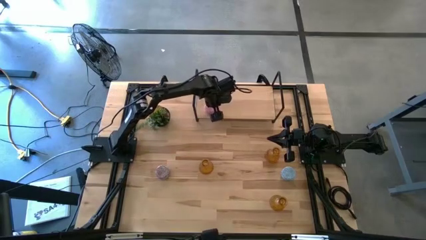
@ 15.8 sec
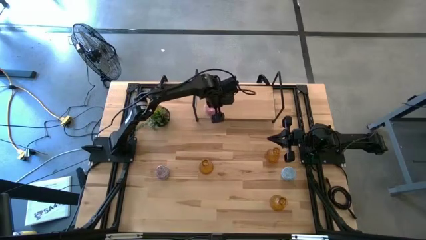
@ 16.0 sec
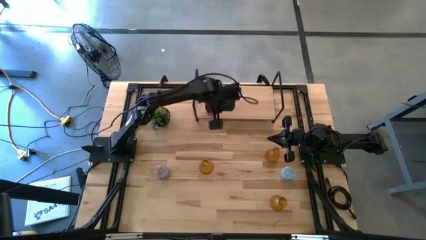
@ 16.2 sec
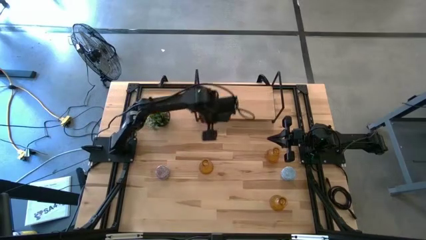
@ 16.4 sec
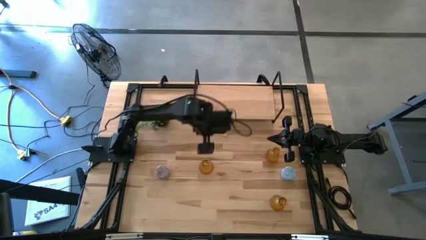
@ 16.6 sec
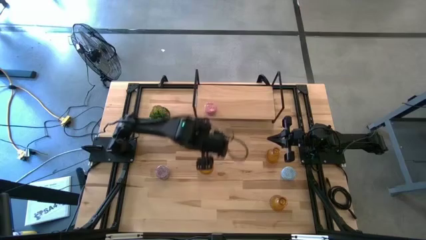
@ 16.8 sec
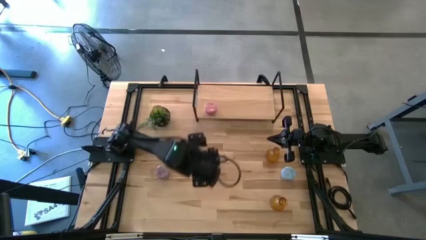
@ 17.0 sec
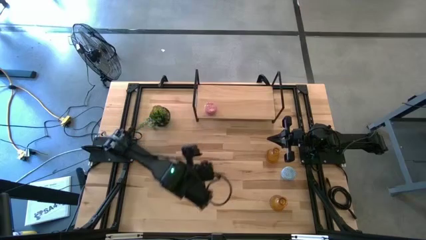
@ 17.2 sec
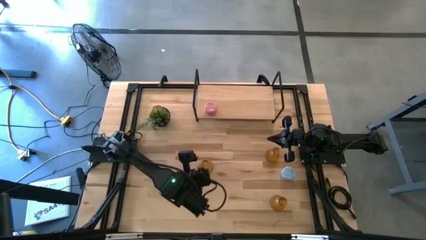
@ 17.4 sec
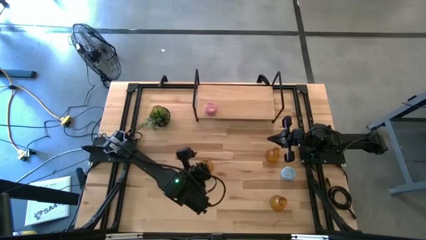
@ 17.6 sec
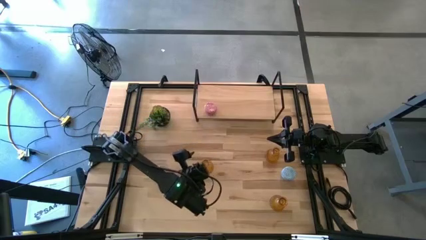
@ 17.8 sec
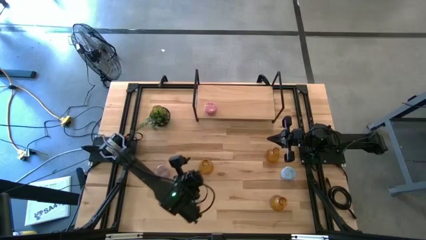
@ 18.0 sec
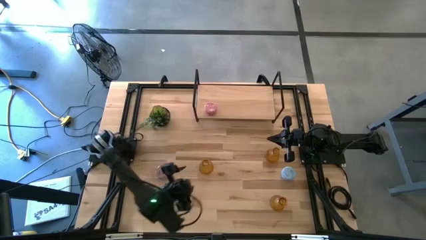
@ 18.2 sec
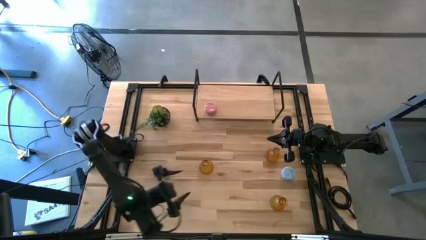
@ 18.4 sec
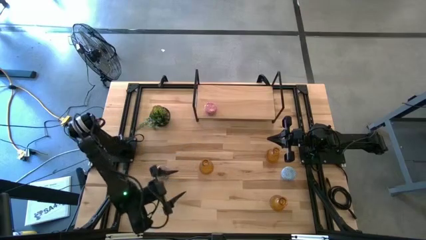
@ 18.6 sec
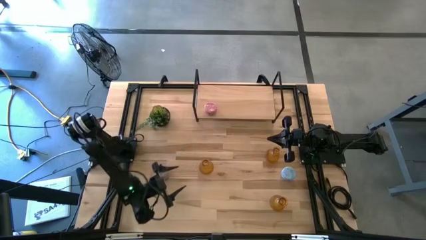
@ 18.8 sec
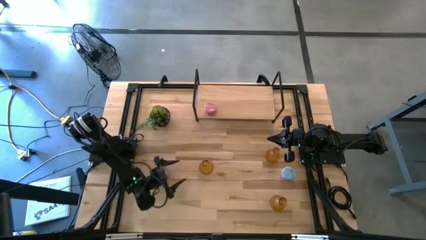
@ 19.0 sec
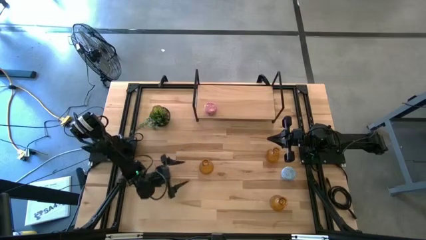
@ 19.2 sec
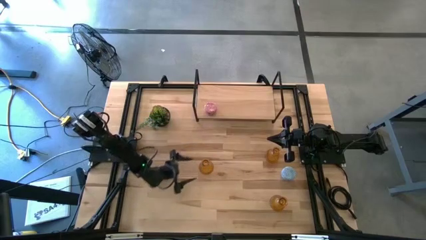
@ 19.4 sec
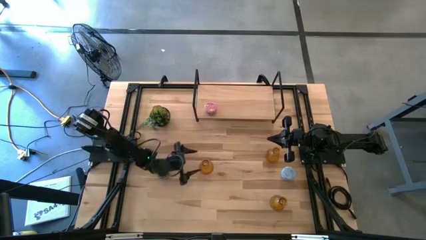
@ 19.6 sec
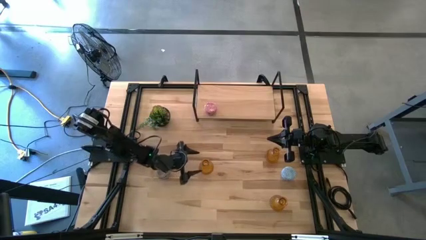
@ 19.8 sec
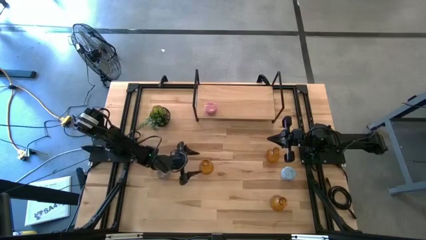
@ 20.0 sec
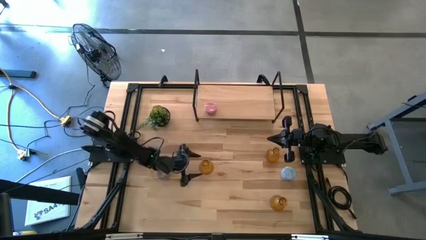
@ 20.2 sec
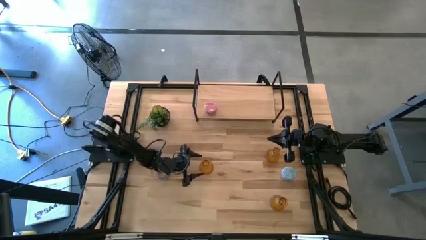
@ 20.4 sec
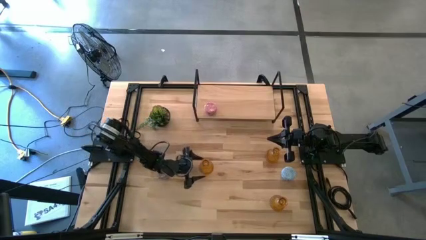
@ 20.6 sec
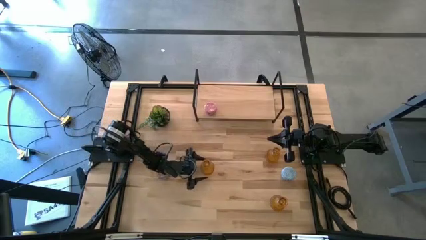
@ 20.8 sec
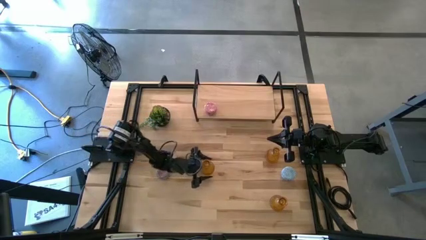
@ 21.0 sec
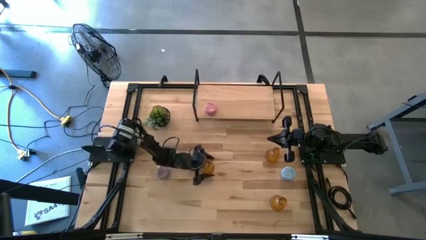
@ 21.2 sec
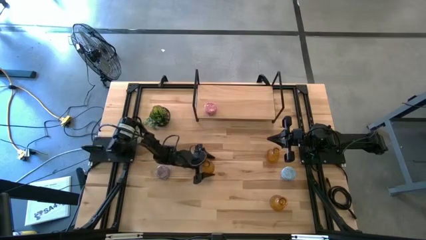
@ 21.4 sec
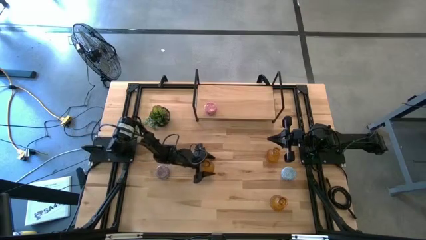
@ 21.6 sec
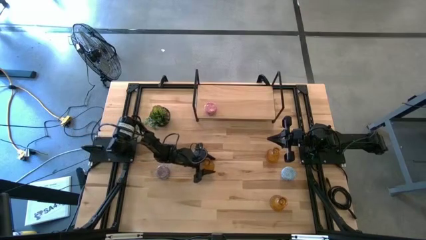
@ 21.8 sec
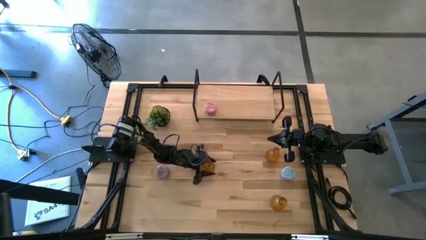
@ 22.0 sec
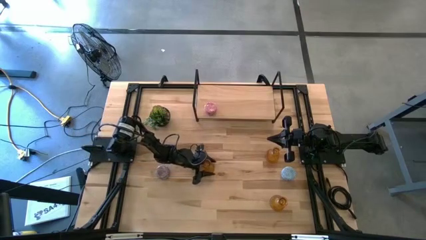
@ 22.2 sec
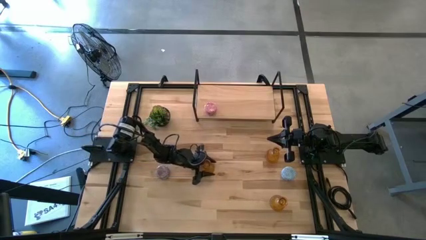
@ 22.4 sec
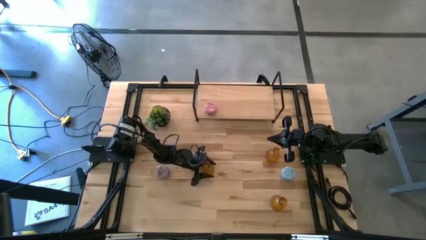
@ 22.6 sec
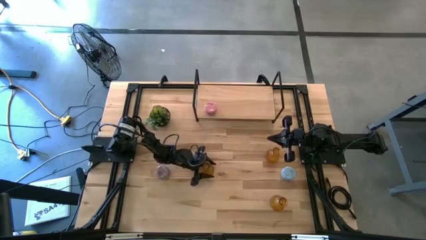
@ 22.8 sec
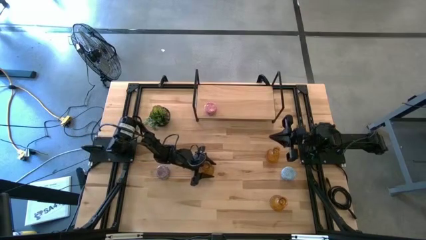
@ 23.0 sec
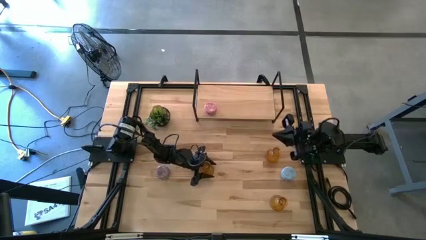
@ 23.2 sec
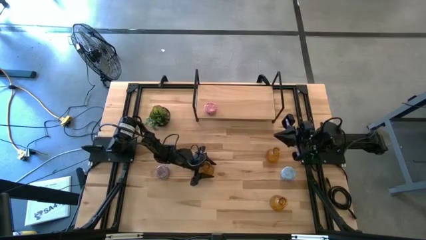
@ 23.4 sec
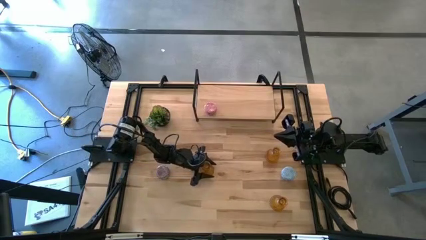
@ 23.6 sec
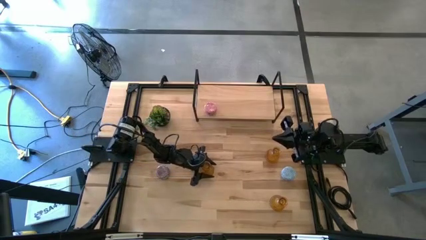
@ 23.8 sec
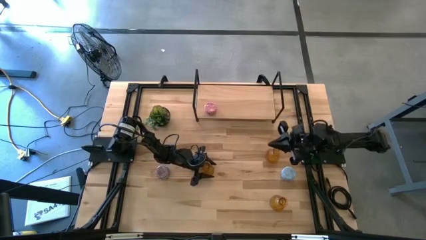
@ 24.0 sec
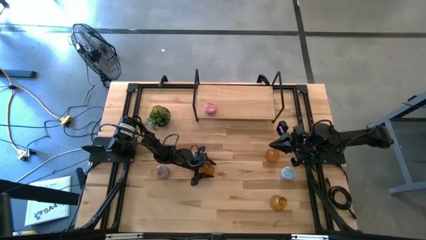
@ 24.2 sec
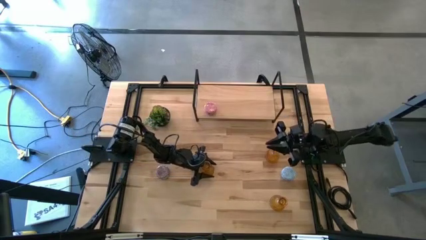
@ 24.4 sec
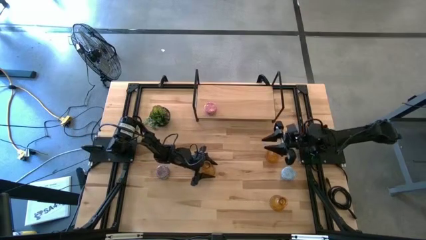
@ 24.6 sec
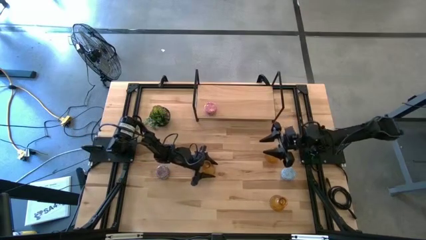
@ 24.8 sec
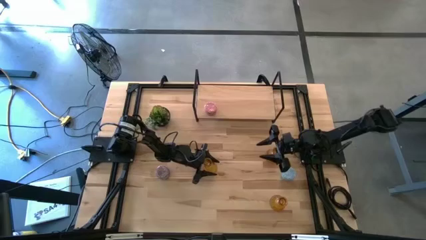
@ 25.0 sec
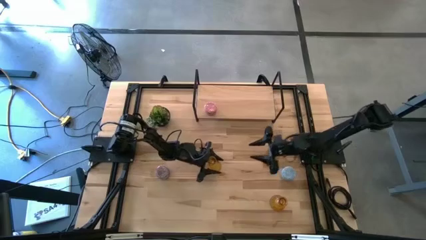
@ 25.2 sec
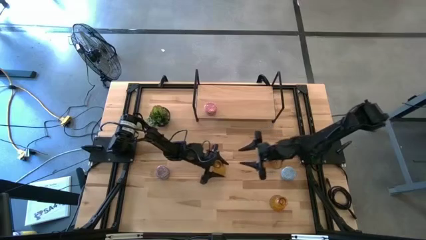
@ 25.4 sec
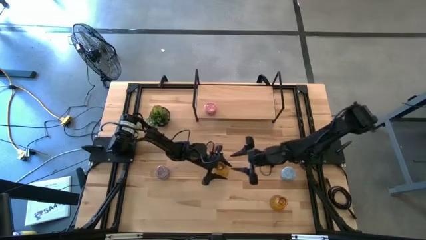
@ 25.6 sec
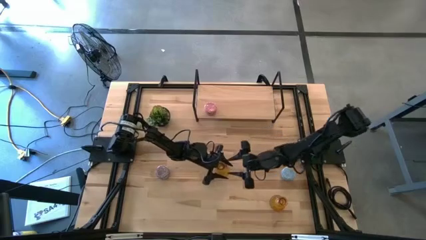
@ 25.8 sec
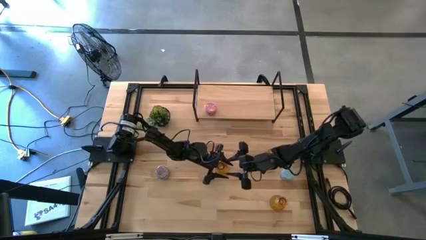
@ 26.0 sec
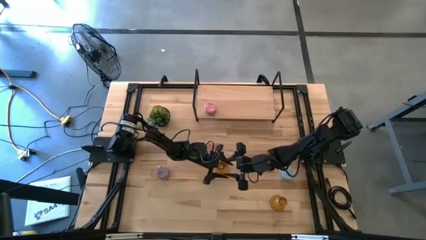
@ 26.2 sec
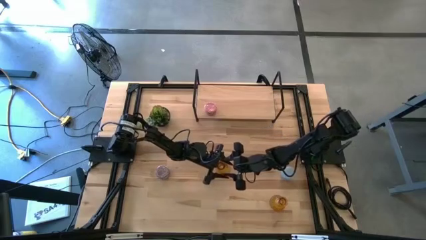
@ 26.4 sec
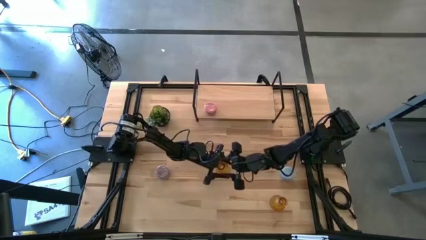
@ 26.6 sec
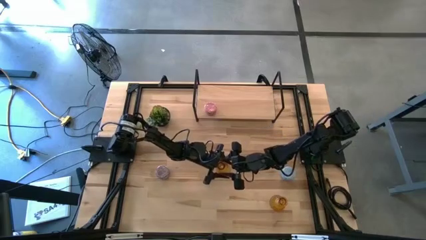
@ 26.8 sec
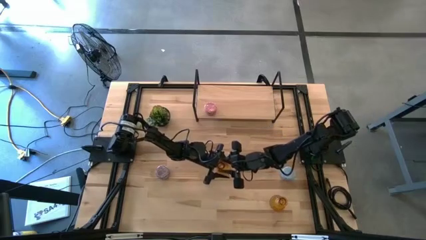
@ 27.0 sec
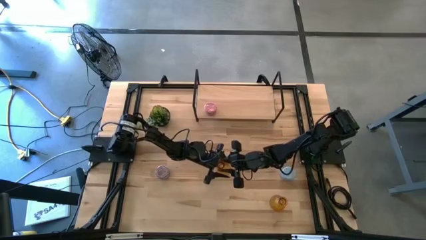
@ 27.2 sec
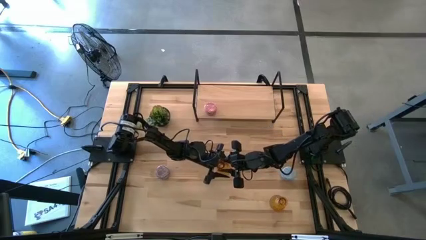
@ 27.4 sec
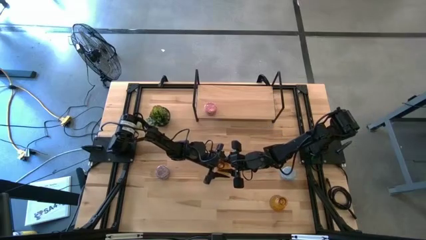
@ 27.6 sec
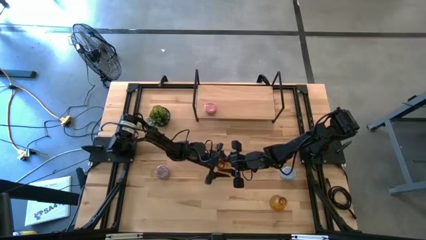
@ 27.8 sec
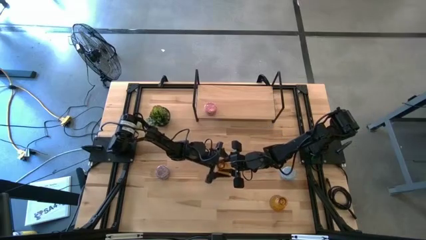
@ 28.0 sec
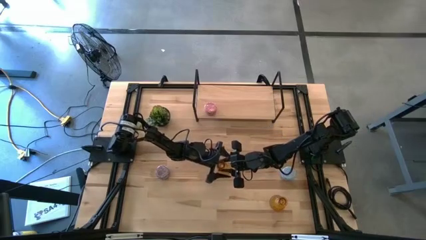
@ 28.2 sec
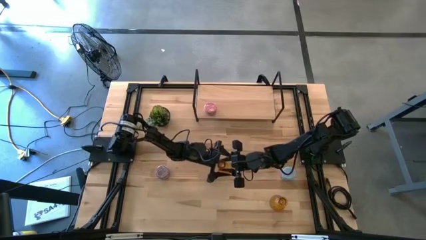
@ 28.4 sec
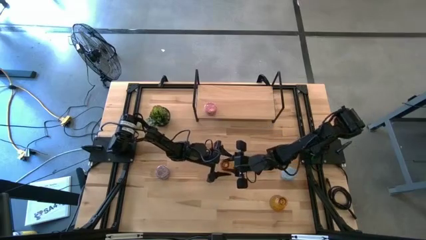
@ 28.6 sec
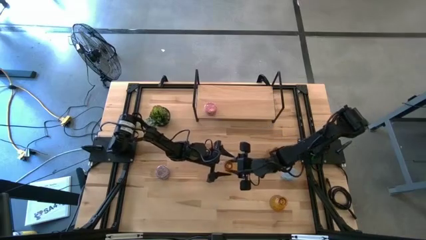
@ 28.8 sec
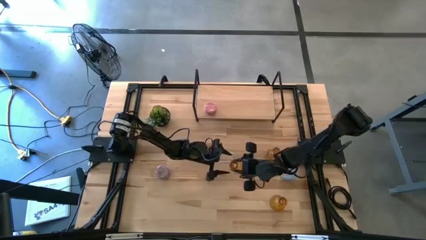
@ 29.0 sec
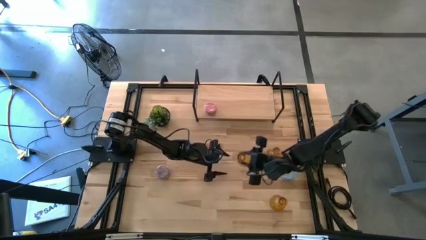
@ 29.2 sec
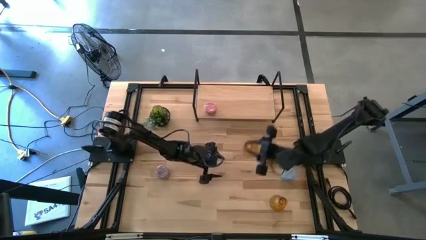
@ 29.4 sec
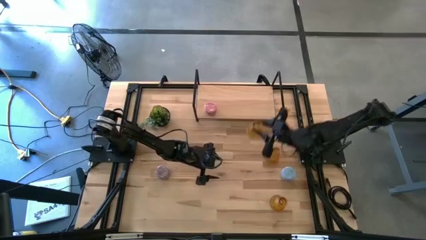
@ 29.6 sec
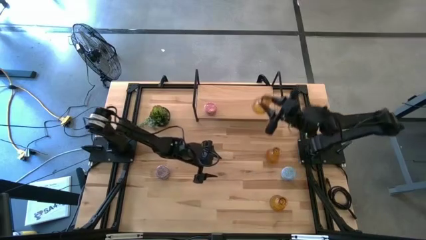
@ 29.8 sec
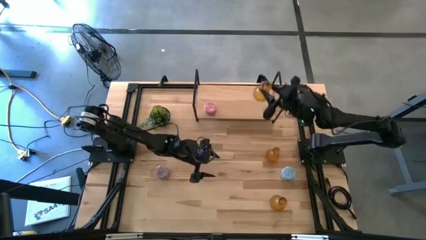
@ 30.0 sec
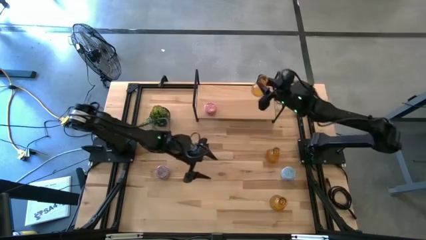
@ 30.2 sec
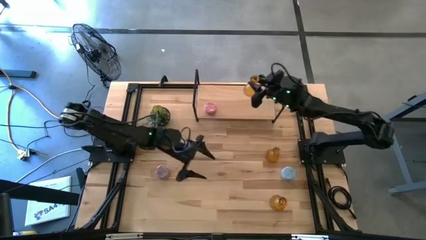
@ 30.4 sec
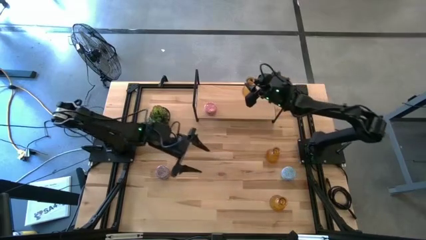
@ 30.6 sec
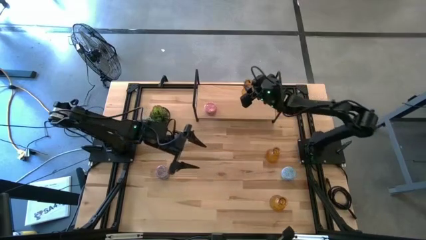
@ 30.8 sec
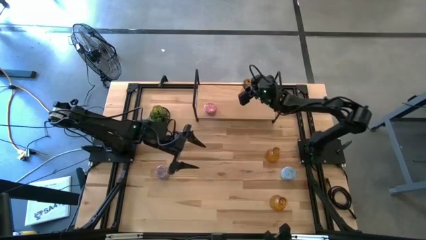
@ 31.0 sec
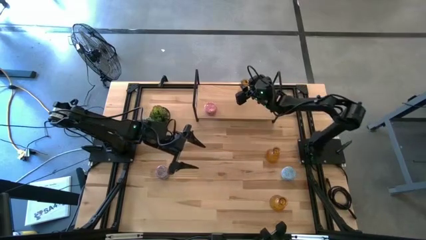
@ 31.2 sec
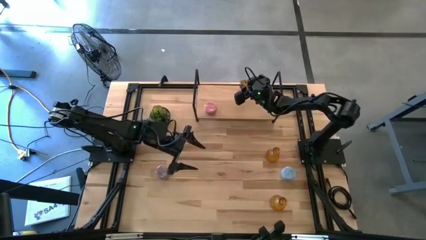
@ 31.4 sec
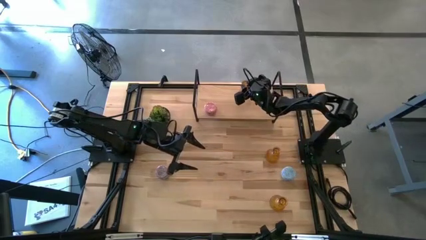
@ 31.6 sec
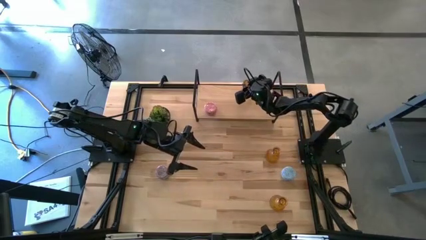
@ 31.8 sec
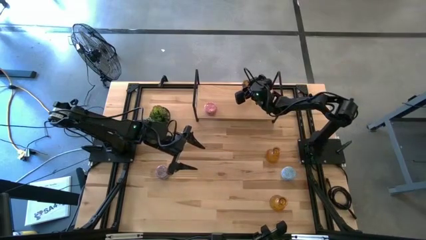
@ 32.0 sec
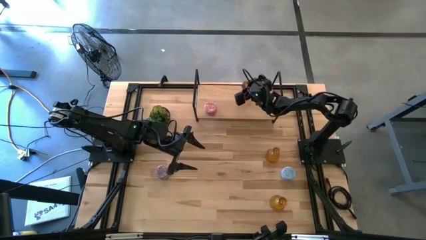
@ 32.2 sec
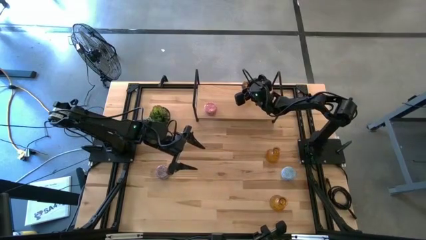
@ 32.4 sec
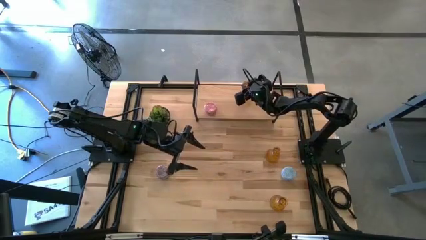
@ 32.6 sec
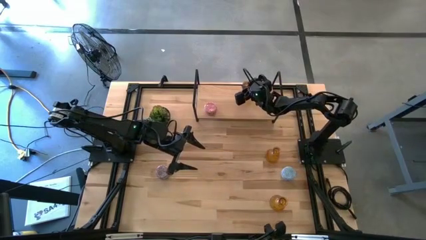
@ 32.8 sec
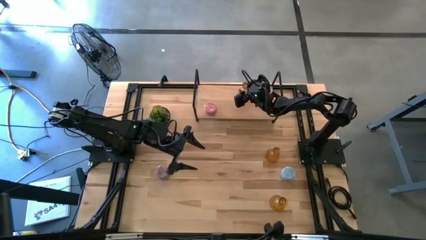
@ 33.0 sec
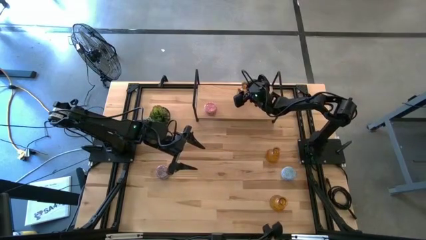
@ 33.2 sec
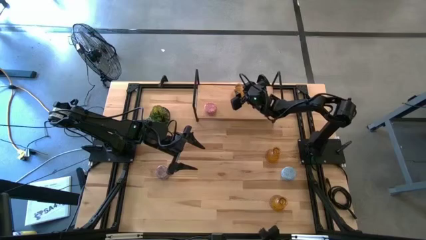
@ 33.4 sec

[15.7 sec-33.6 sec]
Task: Pick & Place candle stick holders
Put the top left orange glass candle holder on the shelf
